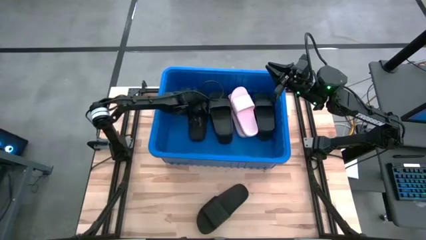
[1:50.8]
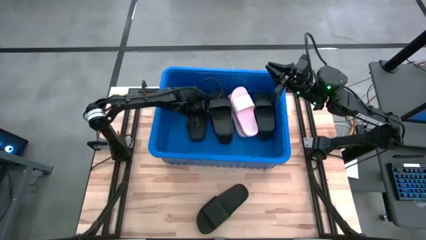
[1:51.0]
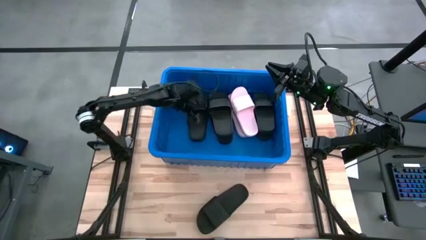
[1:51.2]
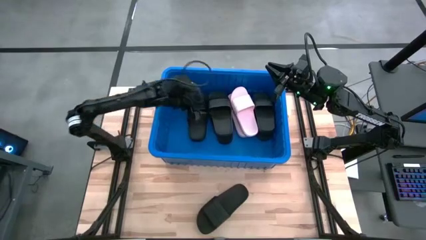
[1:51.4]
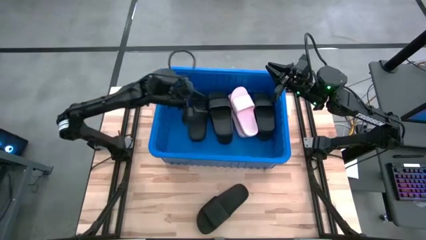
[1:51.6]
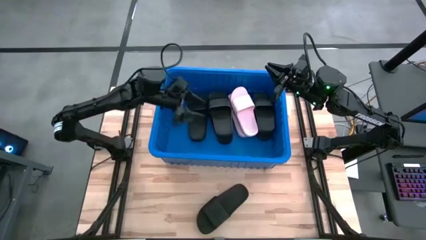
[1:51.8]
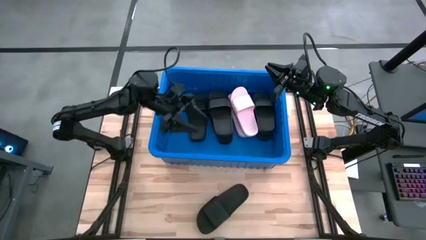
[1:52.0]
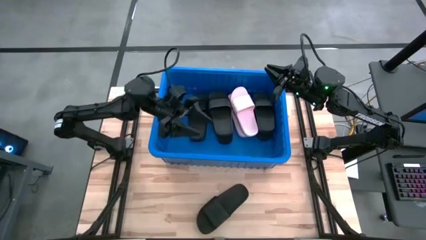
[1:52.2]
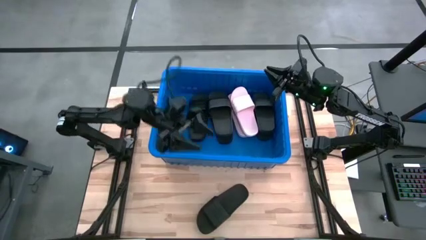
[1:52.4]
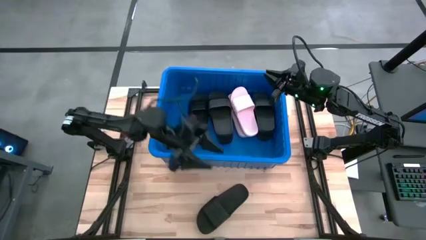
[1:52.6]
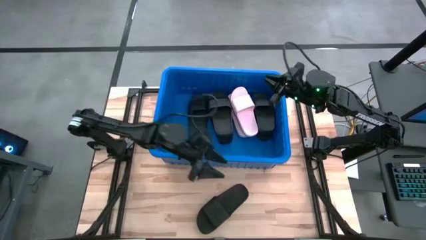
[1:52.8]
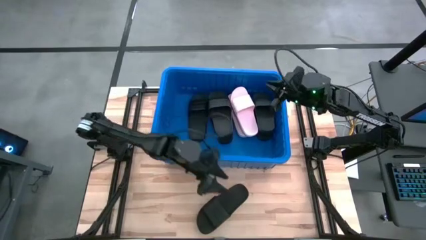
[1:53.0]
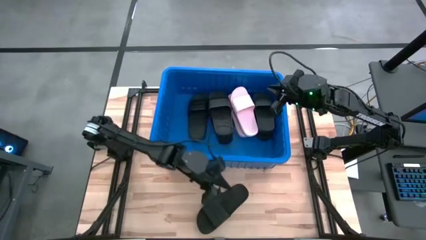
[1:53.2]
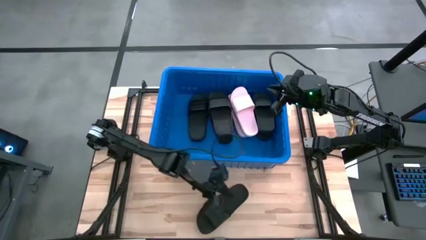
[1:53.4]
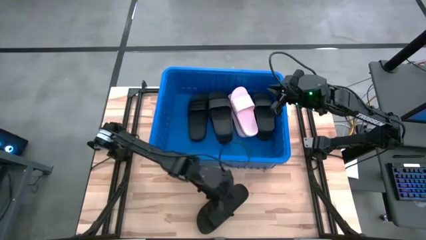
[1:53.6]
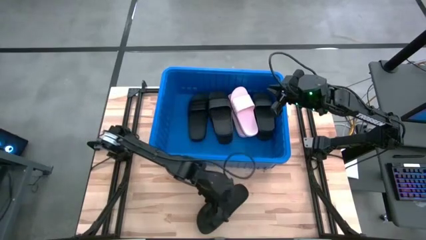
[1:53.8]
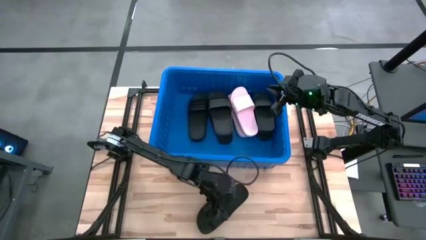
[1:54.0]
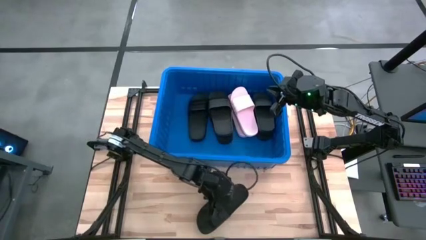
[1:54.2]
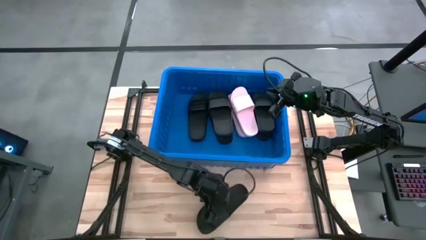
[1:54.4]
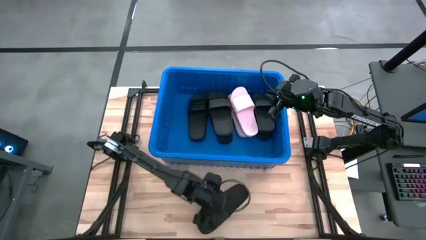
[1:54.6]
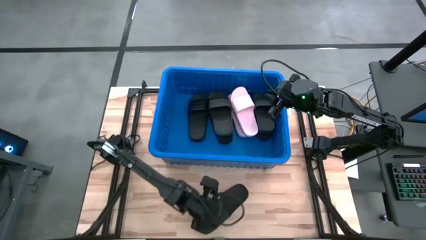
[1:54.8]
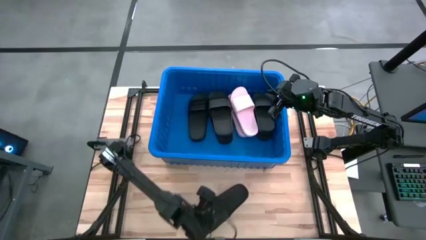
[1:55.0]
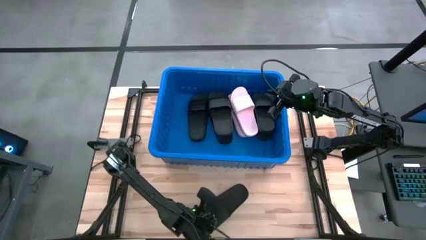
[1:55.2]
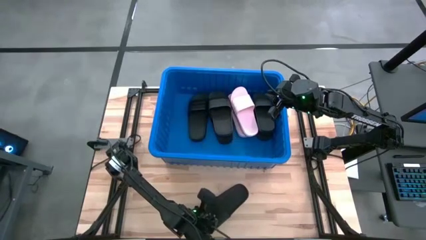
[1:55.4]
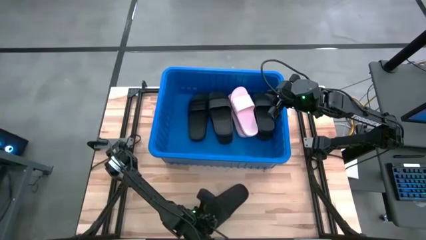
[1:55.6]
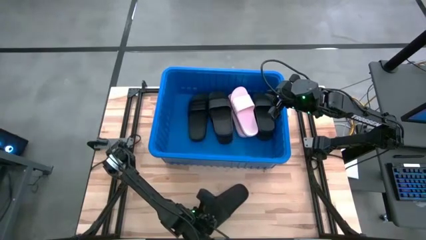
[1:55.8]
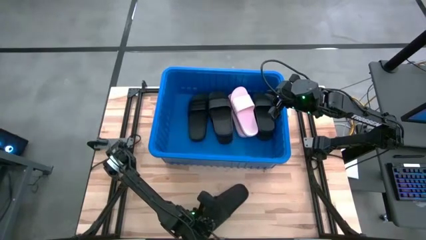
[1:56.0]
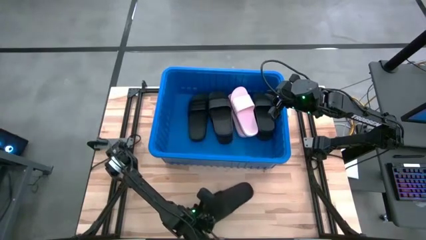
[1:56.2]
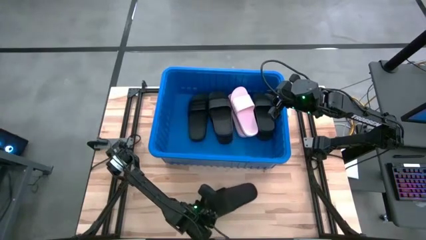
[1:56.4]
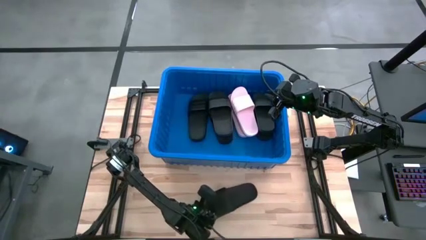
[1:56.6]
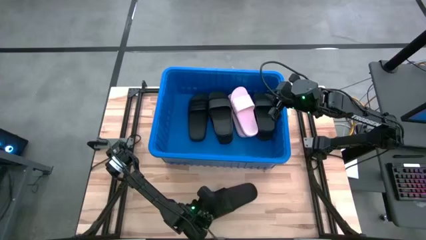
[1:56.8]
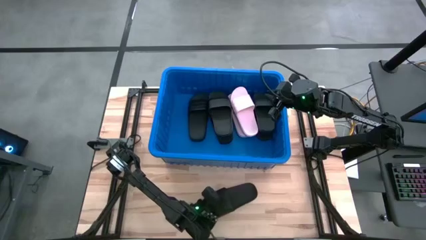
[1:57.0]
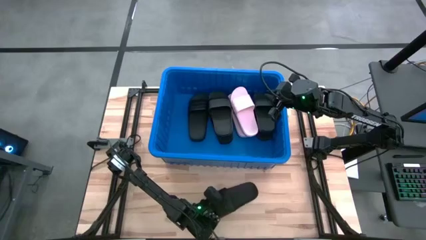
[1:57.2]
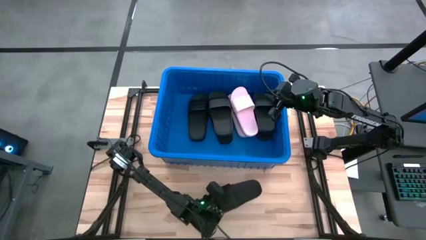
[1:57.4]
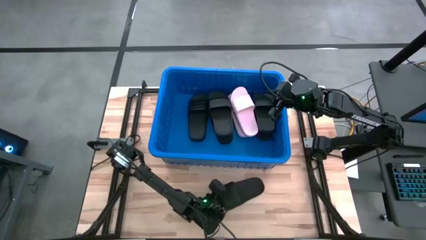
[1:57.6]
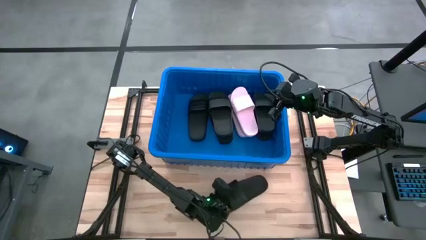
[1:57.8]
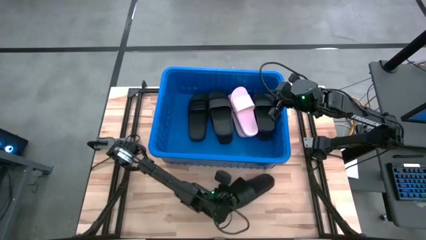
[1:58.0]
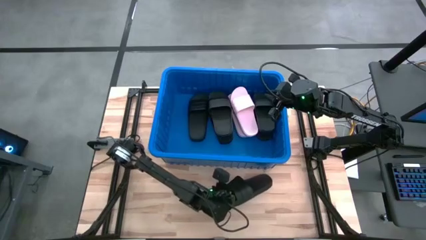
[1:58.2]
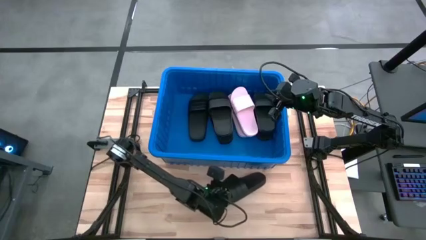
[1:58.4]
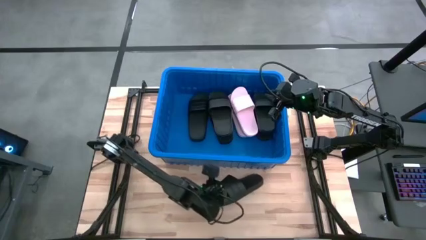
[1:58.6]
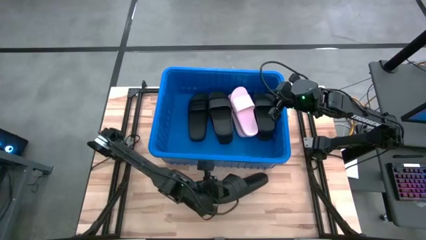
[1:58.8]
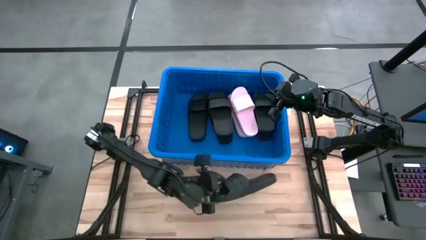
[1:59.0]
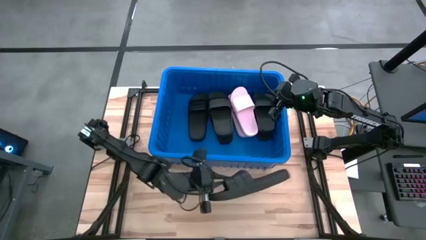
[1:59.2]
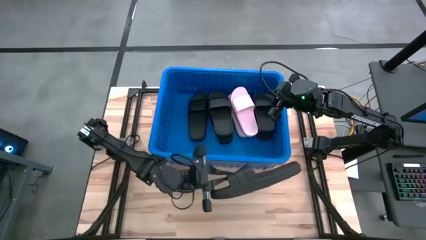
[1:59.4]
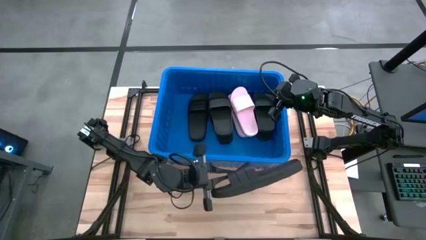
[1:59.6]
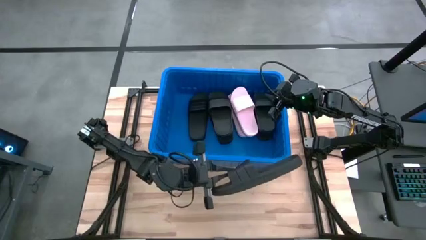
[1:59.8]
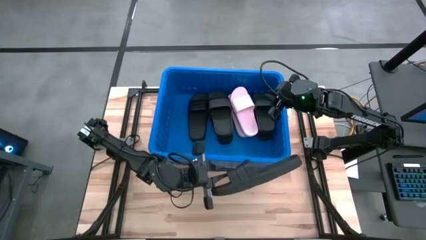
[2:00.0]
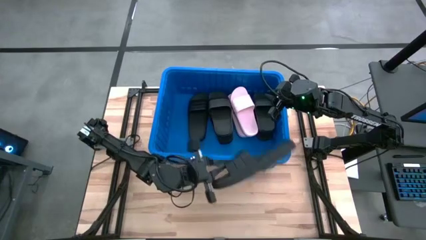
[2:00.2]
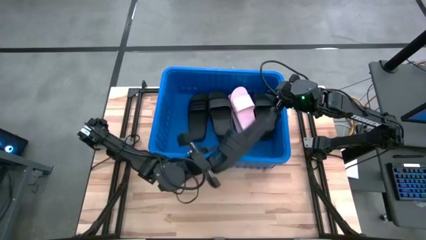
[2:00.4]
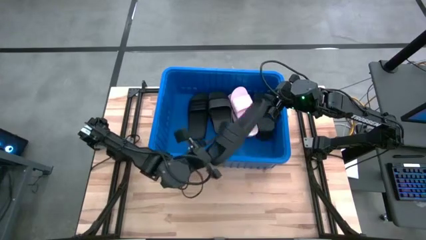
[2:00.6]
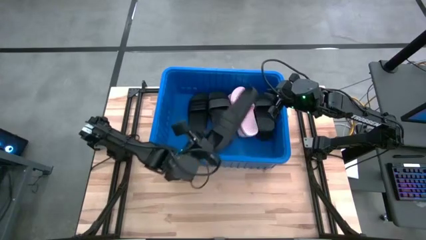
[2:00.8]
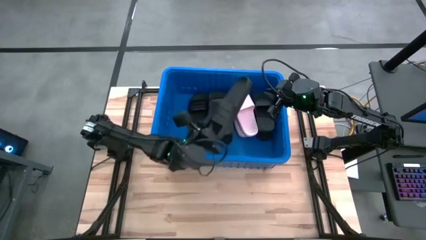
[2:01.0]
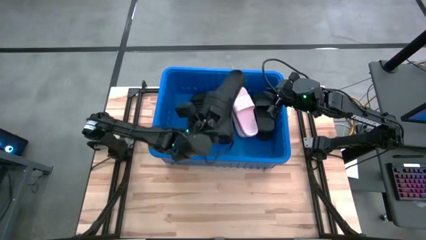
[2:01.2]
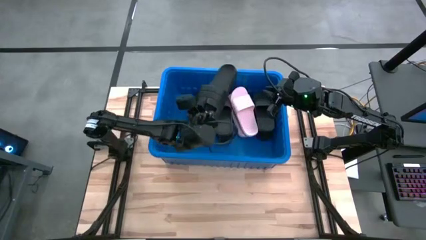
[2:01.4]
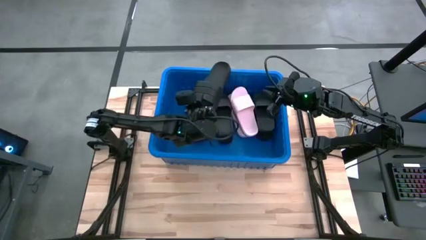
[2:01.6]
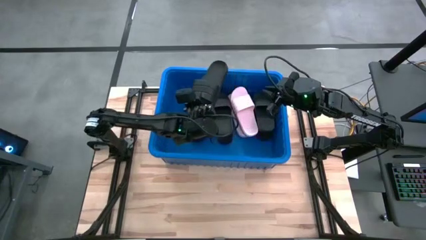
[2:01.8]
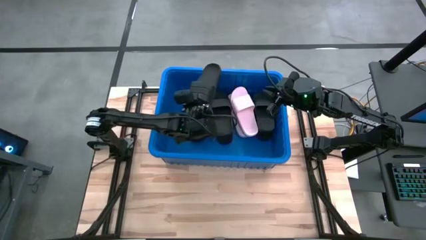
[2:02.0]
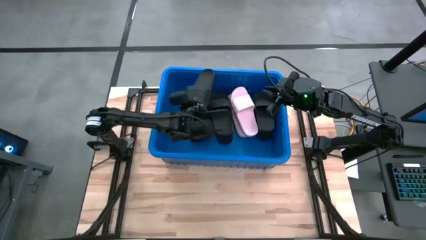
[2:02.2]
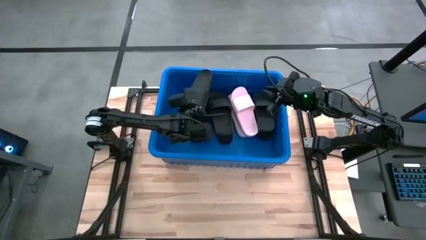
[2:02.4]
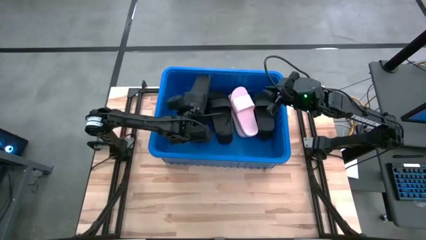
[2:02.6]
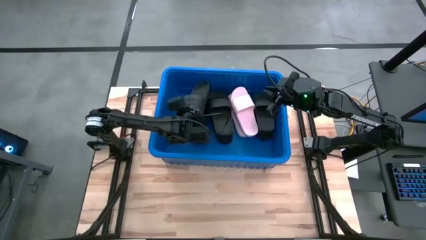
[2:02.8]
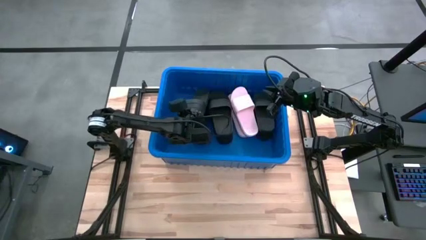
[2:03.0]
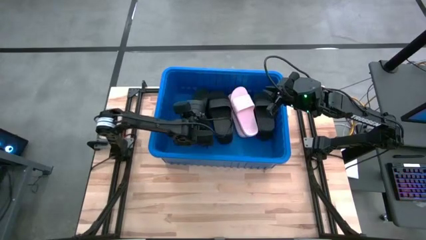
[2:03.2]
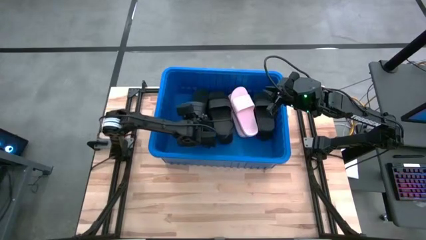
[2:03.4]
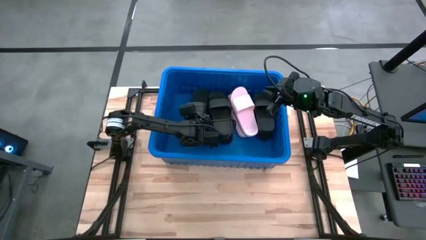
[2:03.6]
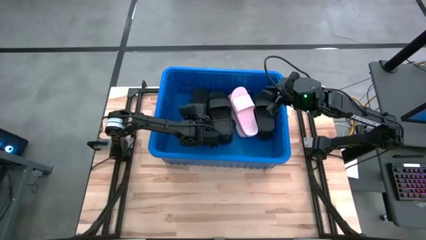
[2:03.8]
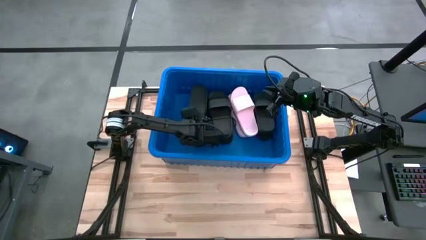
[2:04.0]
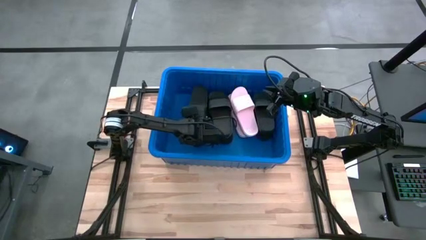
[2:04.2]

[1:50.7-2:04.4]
Task: Pick and place slides into bin
Put the black slide into the blue bin
